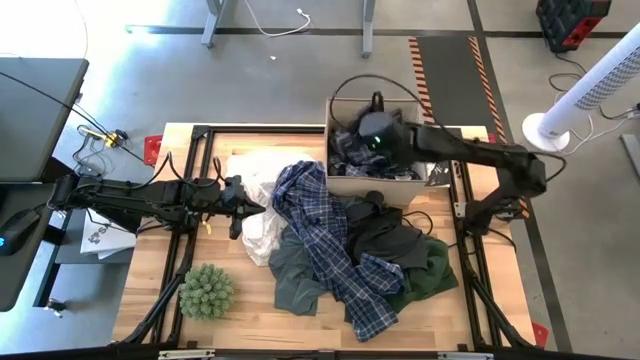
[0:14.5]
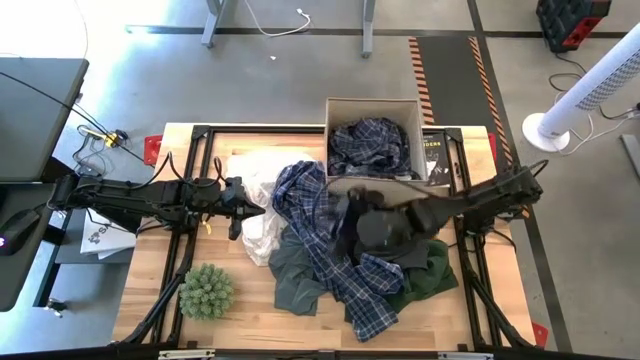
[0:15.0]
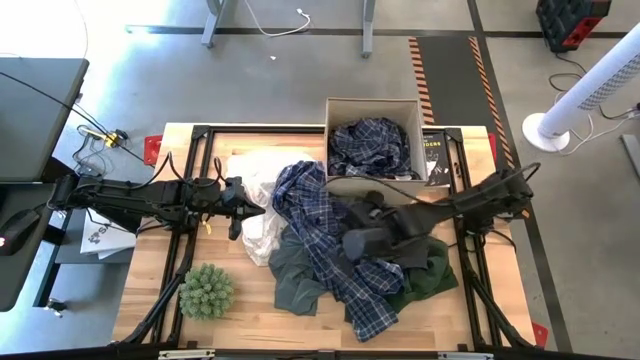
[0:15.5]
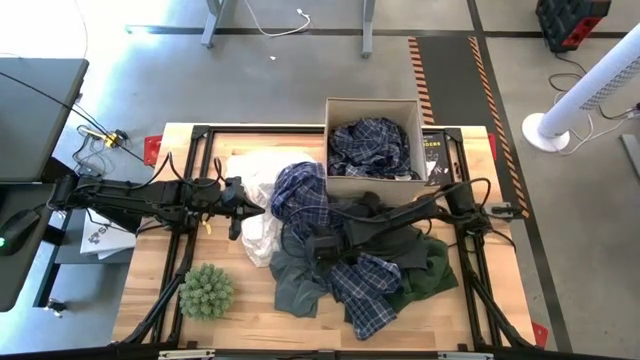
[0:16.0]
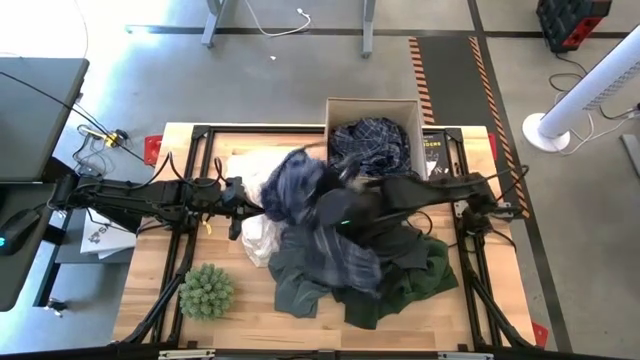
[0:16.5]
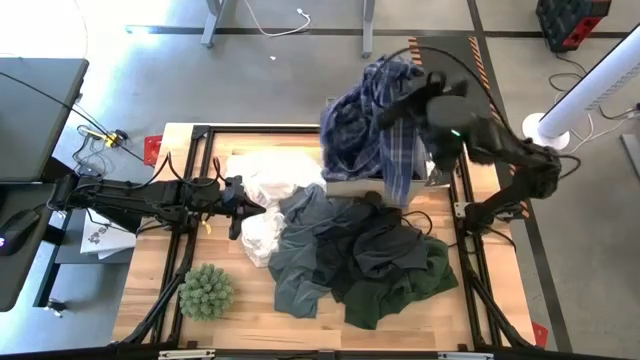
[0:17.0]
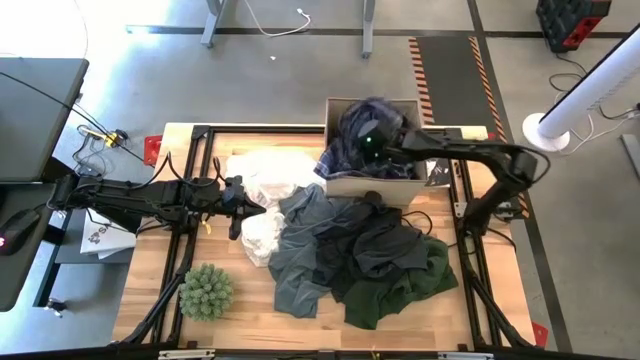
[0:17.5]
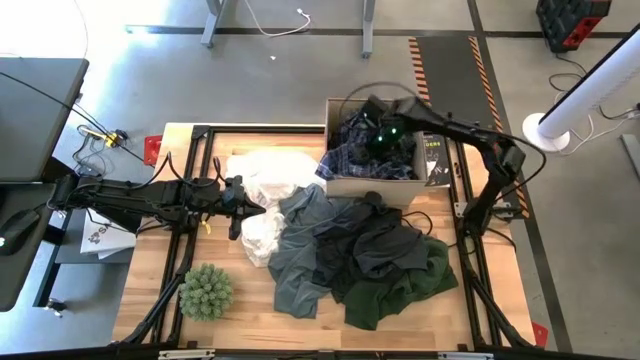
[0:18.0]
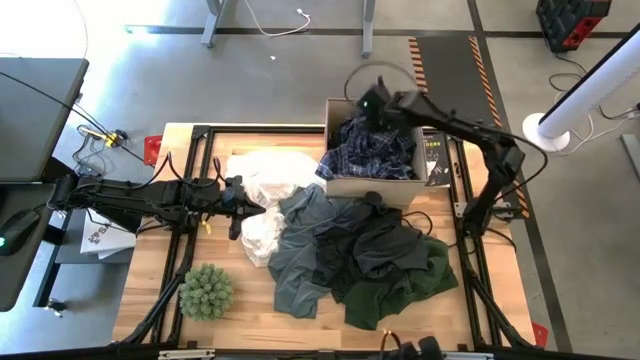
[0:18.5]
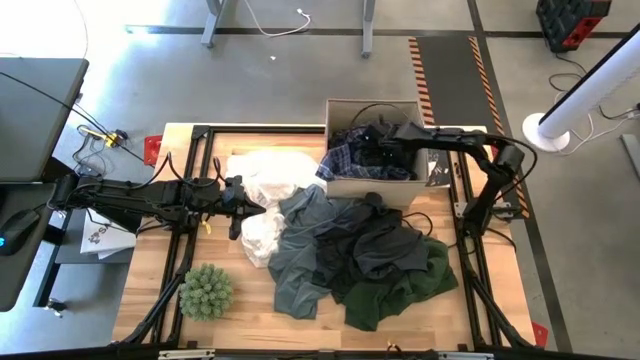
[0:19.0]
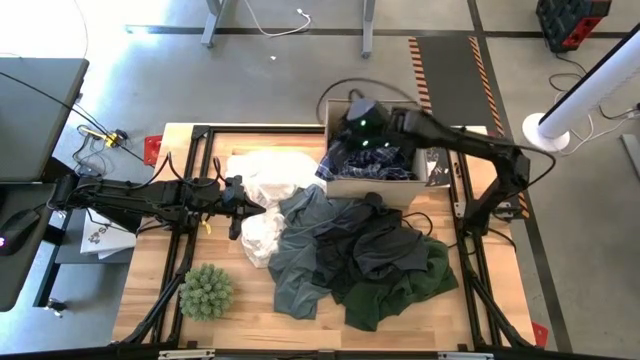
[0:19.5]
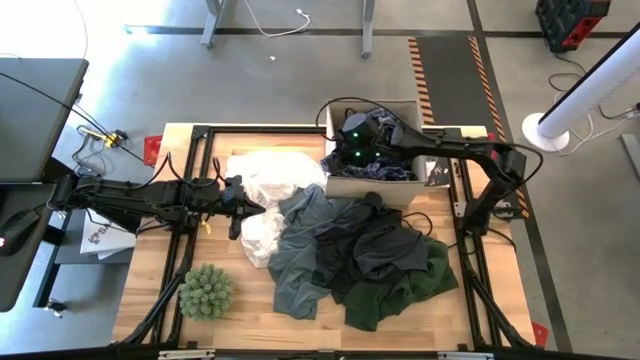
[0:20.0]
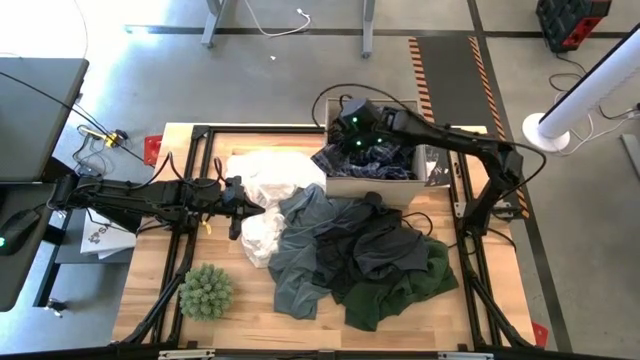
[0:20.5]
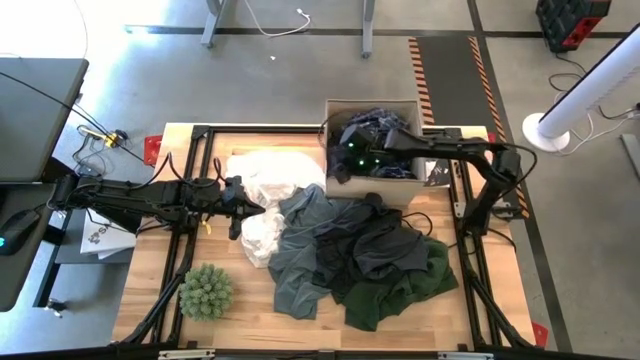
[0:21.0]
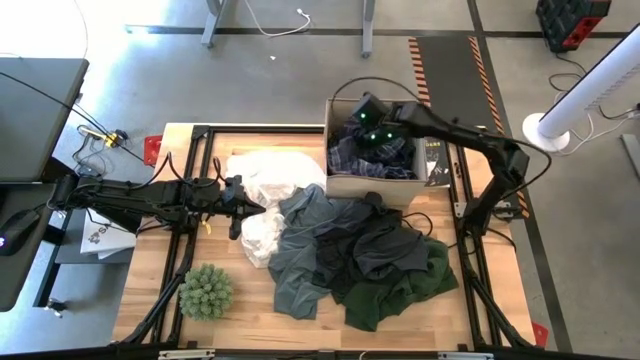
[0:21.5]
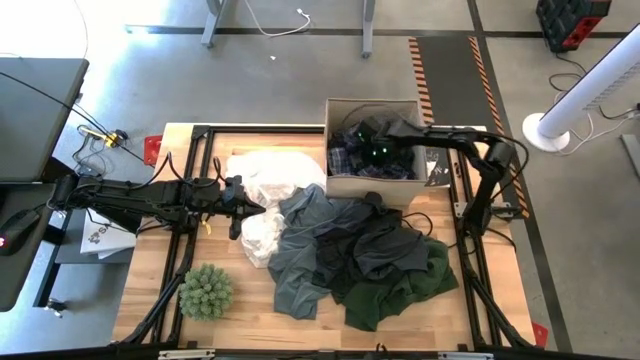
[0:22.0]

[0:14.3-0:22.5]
Task: Sort clothes
Put the blue striped pants into the laundry bin

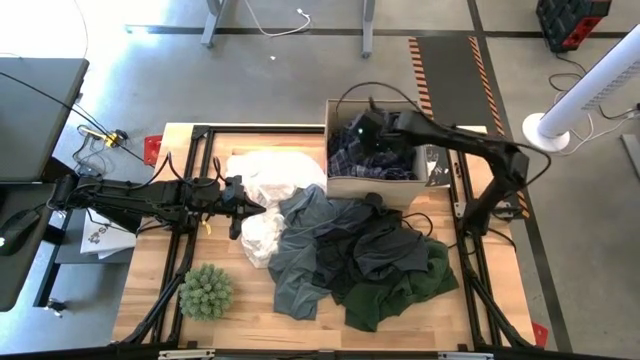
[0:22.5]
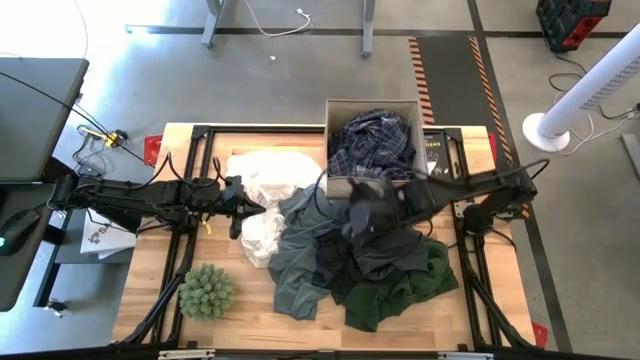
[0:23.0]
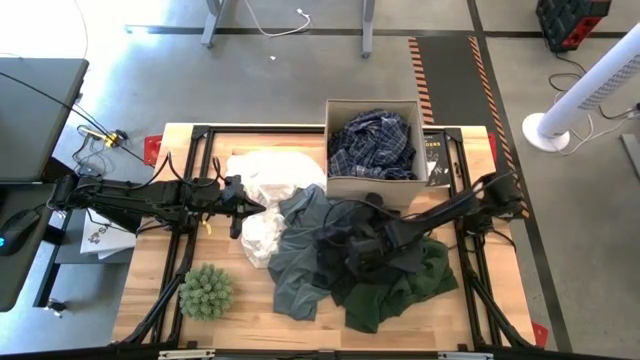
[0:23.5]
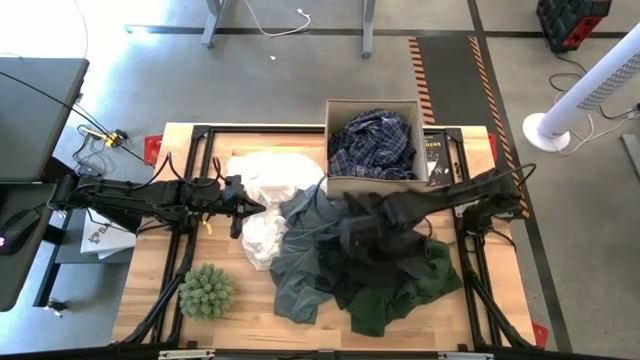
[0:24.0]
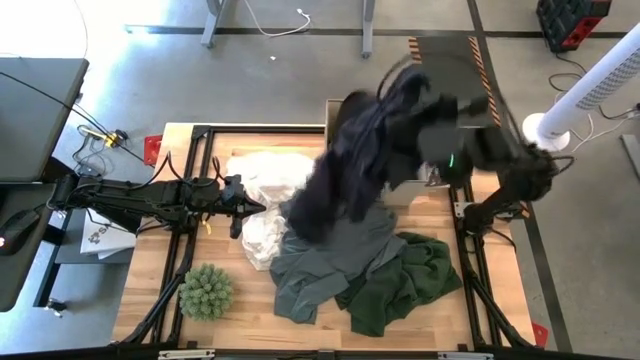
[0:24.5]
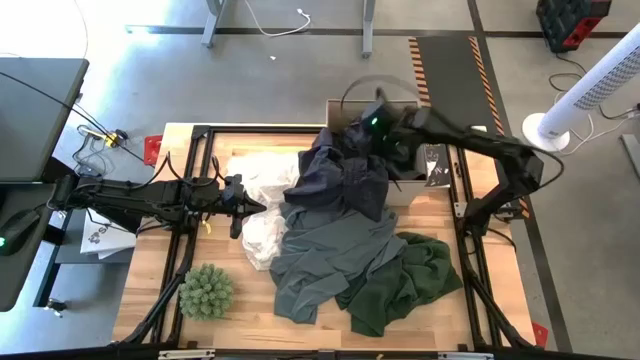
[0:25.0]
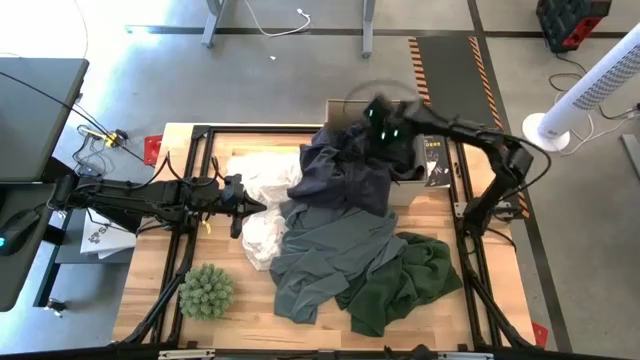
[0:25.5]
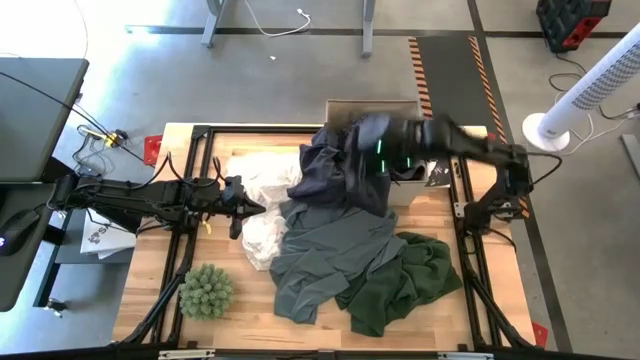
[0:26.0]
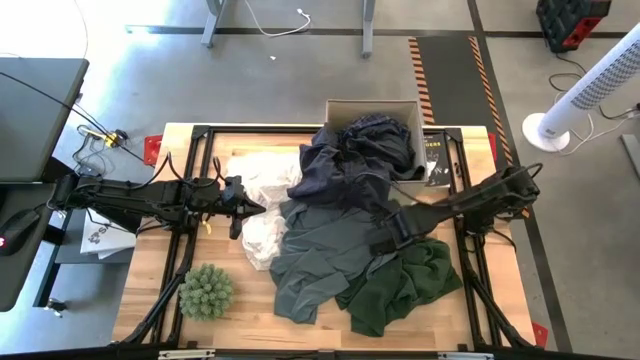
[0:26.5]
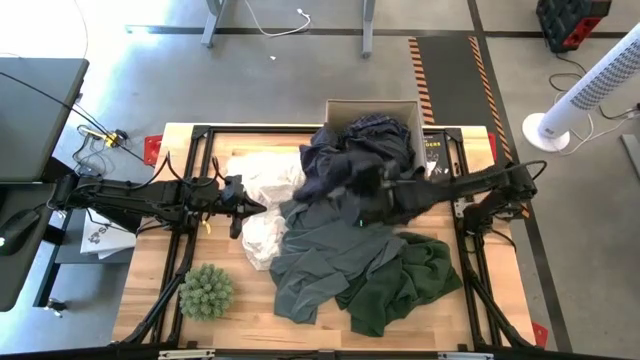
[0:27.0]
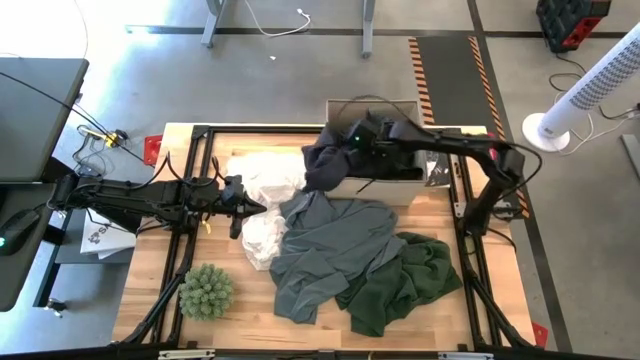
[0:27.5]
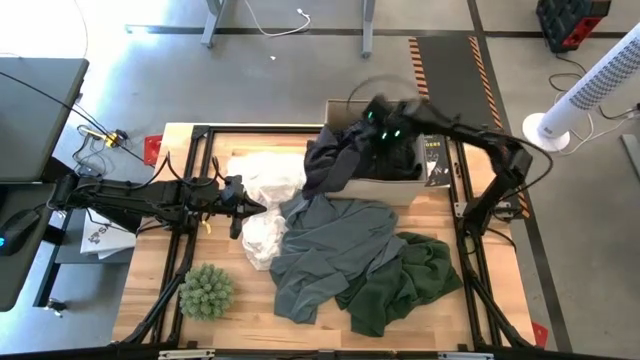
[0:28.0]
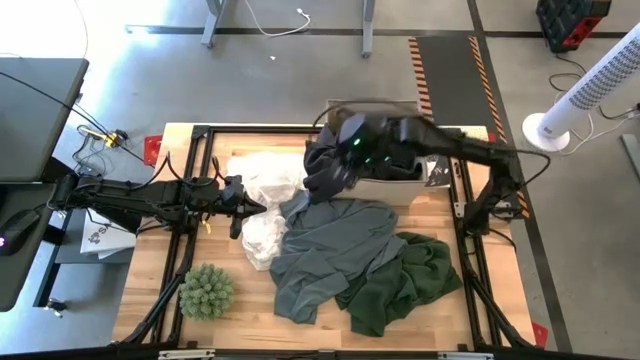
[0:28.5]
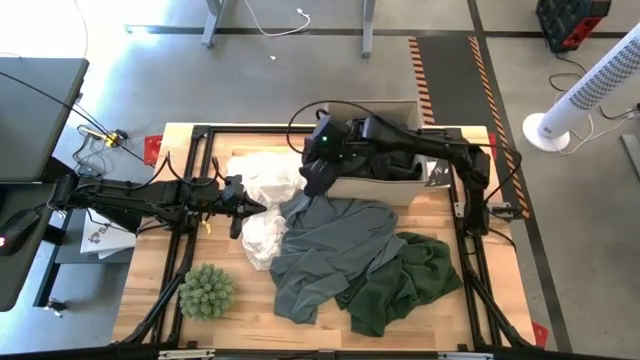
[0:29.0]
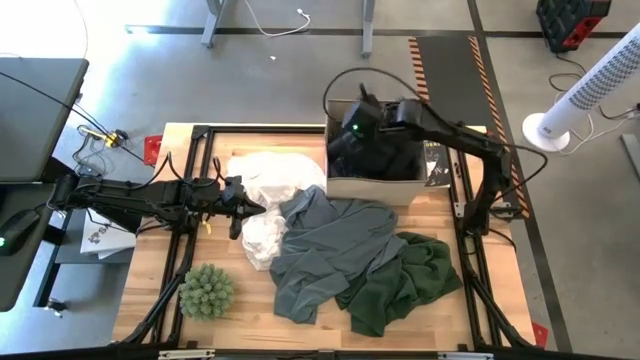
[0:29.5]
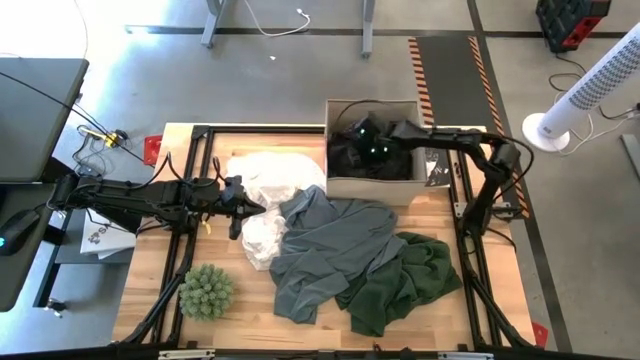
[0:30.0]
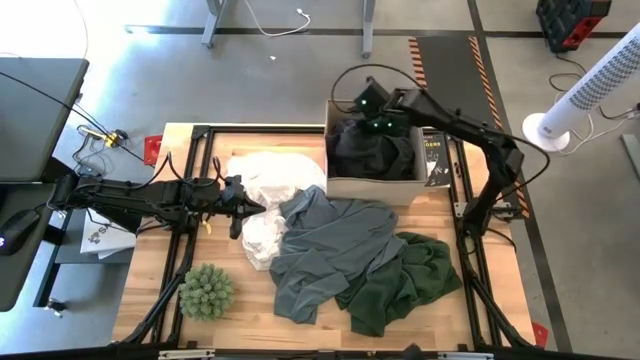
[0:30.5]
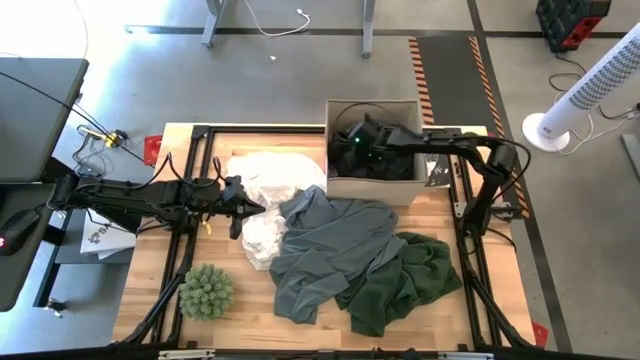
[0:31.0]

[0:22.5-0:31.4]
Put the black shorts into the laundry bin

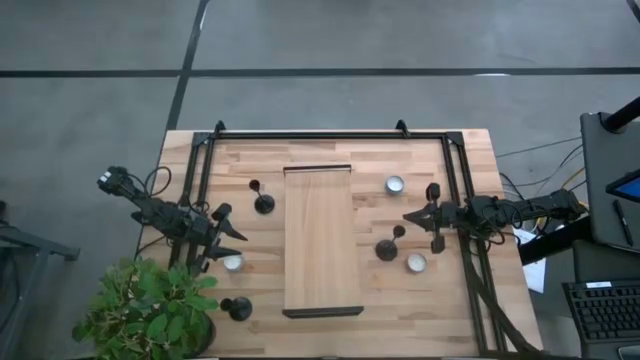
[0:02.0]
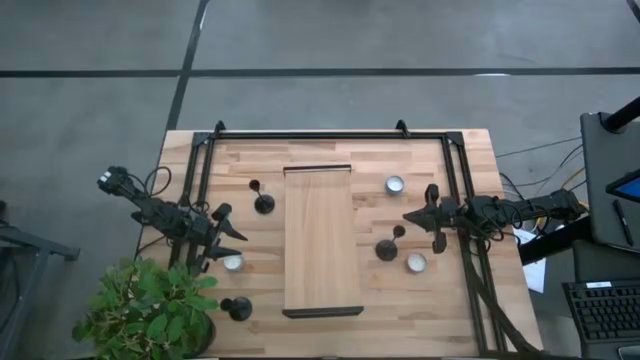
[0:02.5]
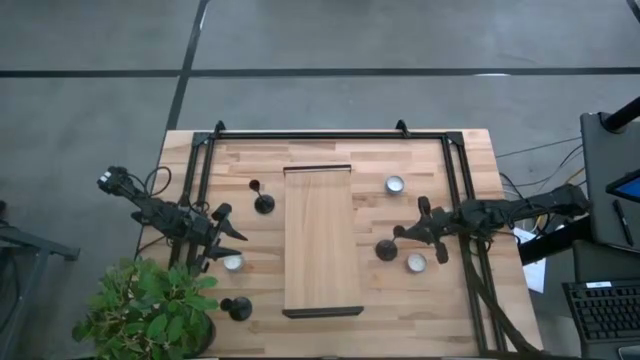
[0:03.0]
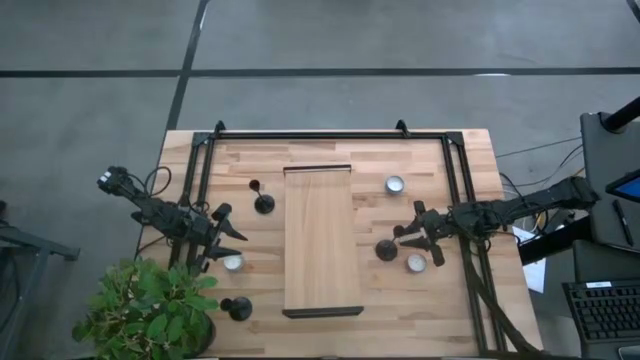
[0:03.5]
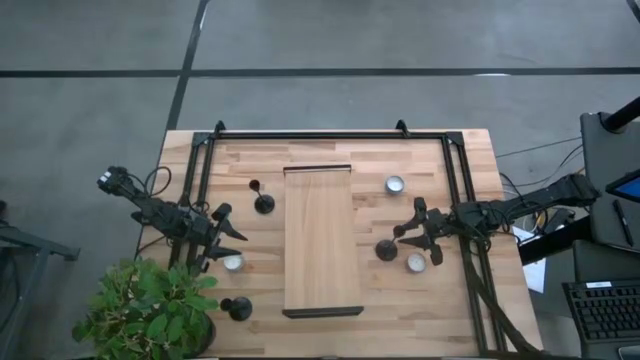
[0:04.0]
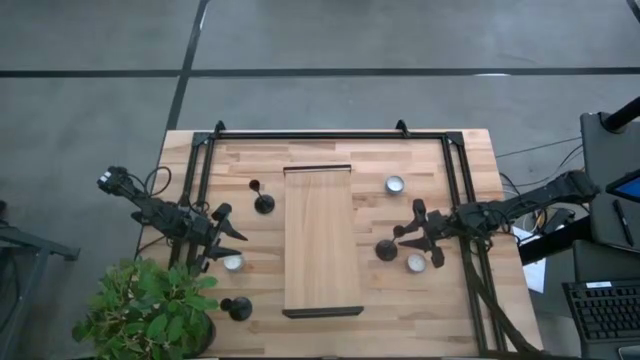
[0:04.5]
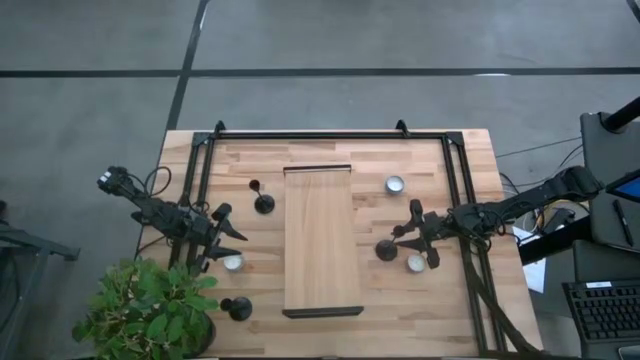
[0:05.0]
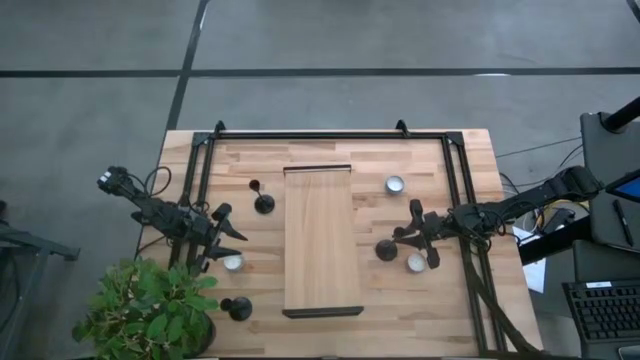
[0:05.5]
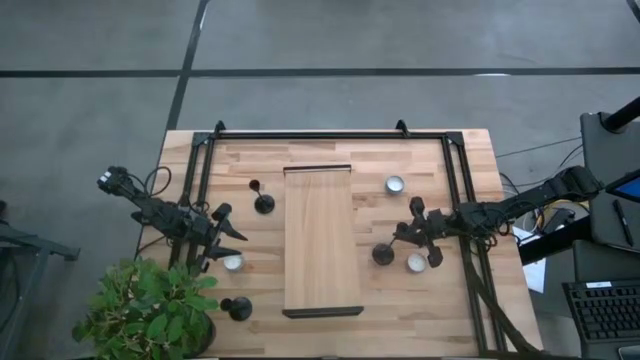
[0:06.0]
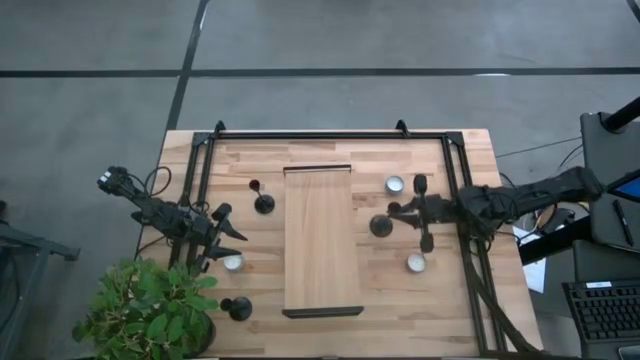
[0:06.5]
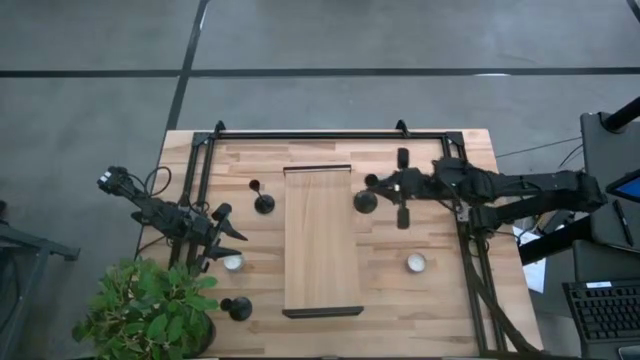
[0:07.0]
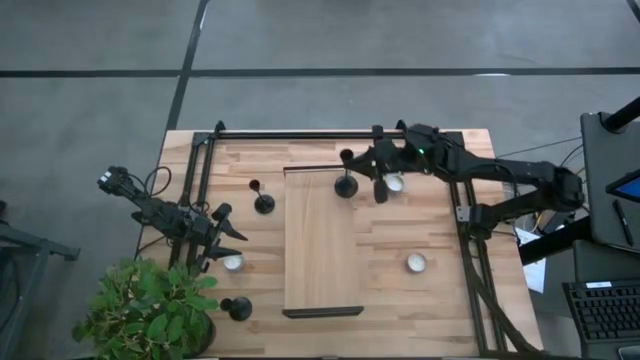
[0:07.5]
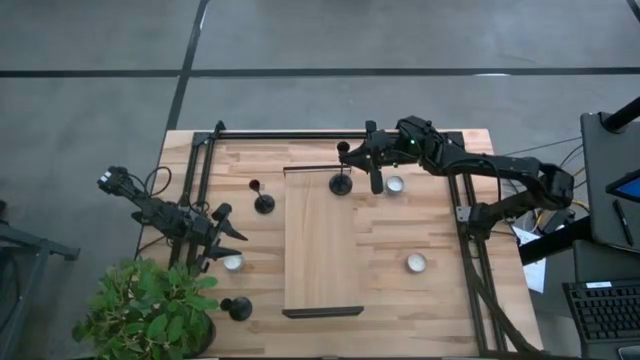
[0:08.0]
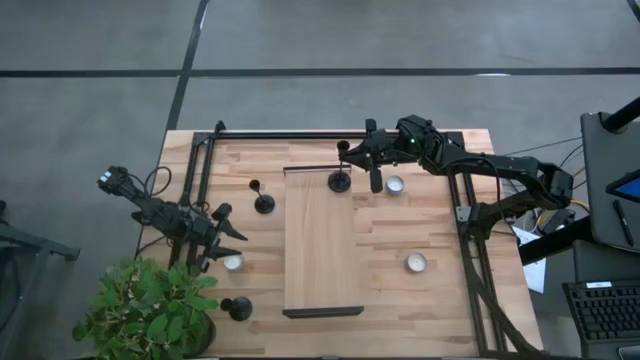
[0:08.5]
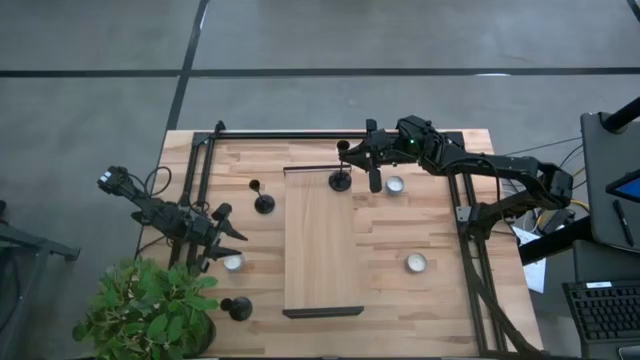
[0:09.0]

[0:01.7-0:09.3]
Task: Pick & Place candle stick holders
Put the left black candle holder on the shelf
